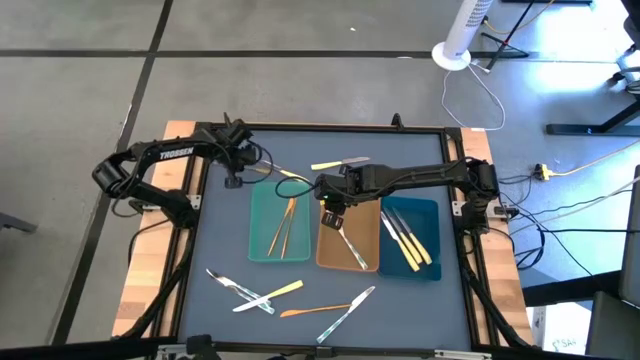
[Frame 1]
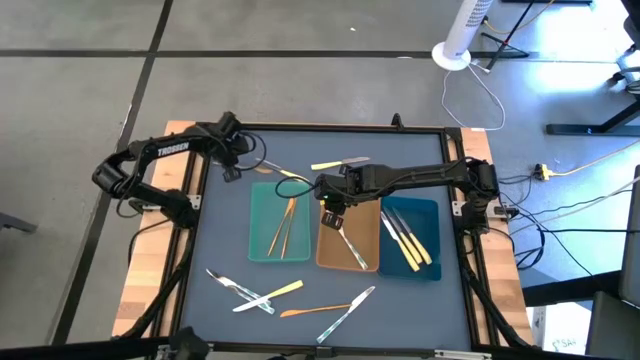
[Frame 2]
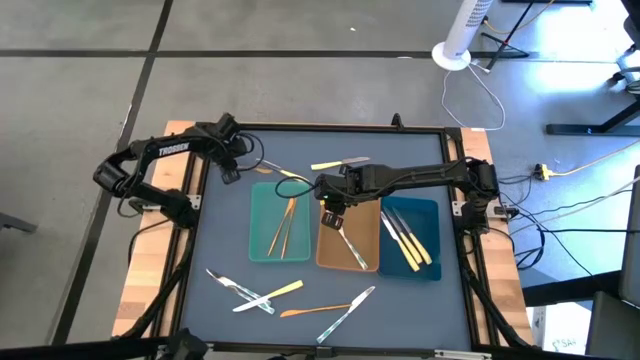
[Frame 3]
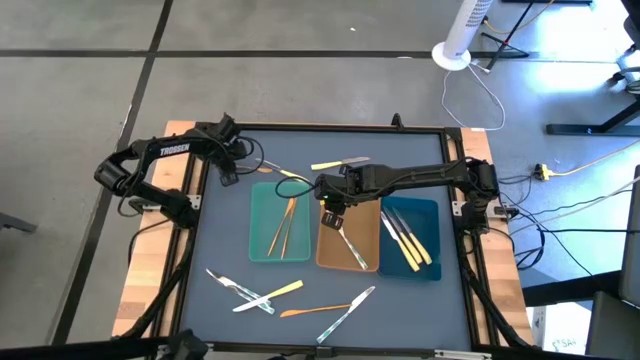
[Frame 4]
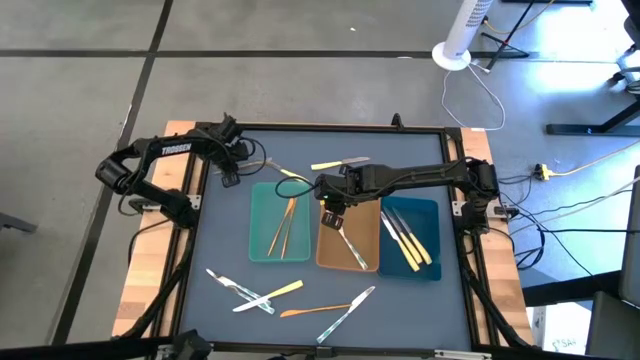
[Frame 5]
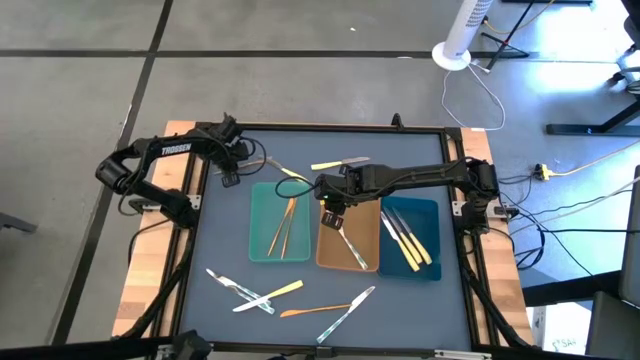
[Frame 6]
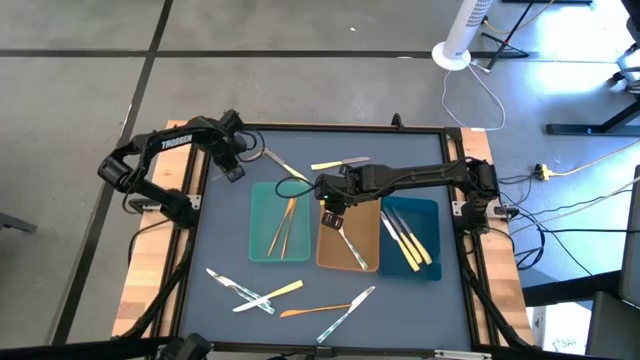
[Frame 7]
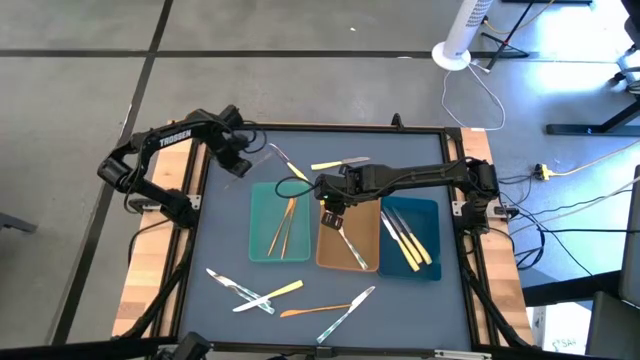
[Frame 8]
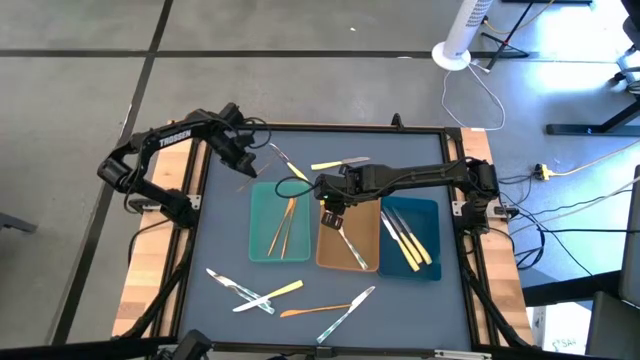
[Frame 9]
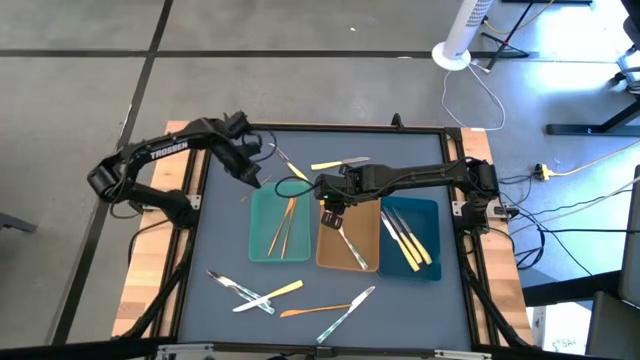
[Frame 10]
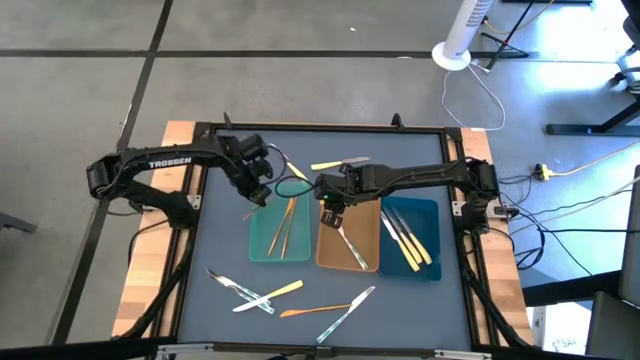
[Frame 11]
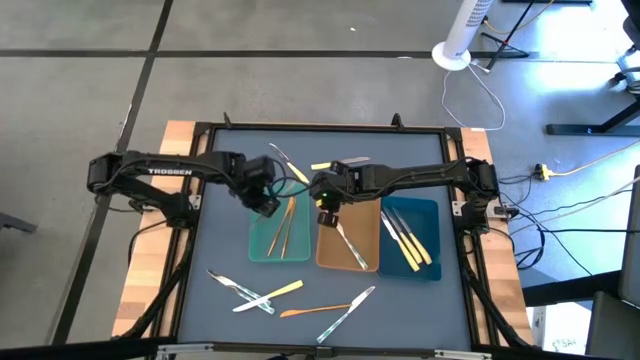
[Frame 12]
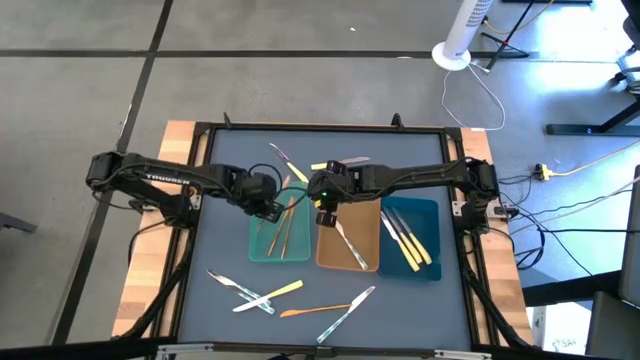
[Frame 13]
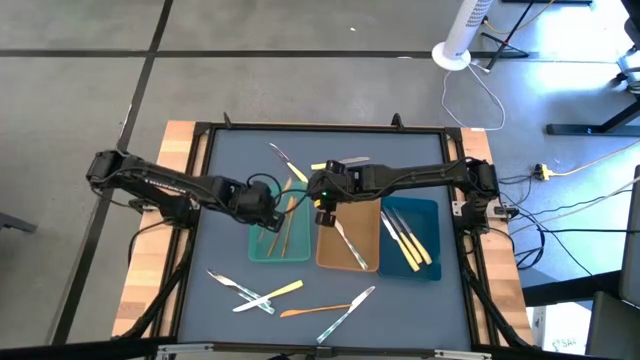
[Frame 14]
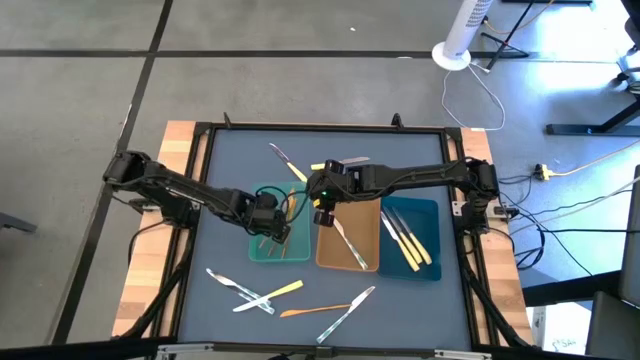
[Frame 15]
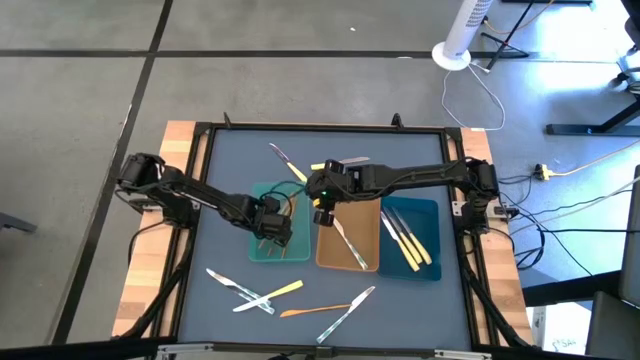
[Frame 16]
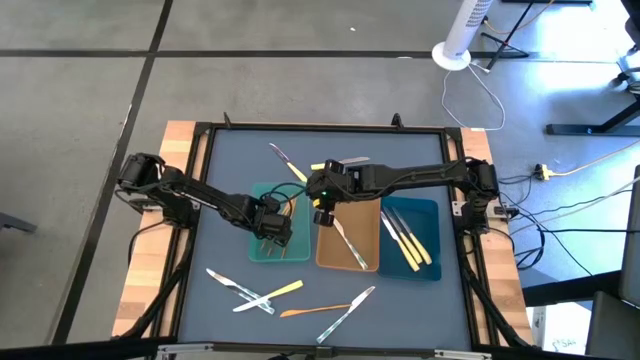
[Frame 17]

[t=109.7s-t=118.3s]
Task: Sort silverware by color (type)
Put the gold knife into the green bin

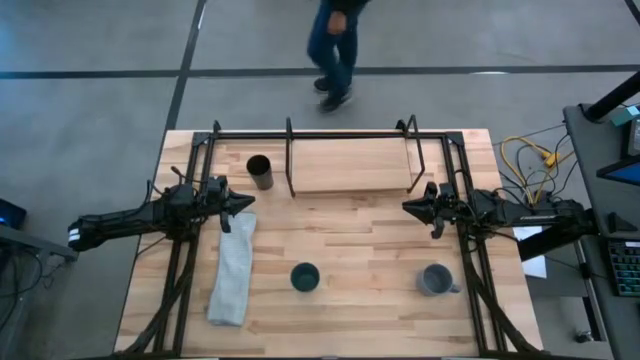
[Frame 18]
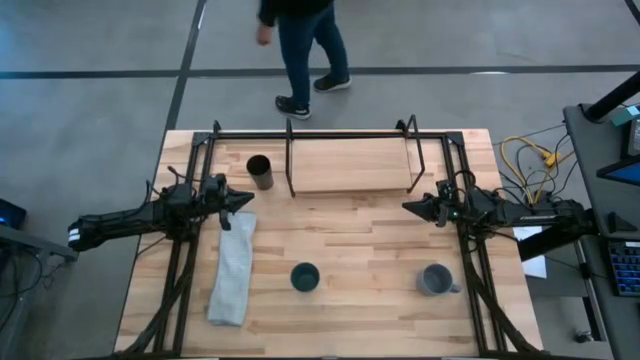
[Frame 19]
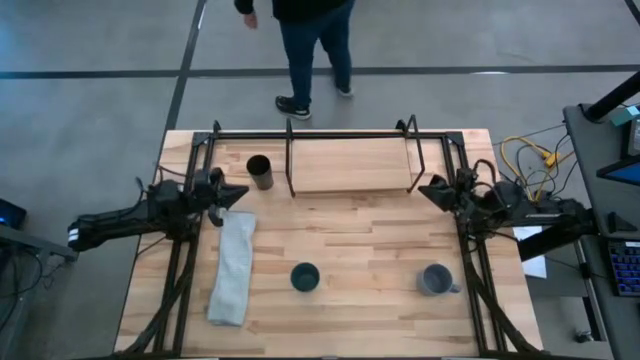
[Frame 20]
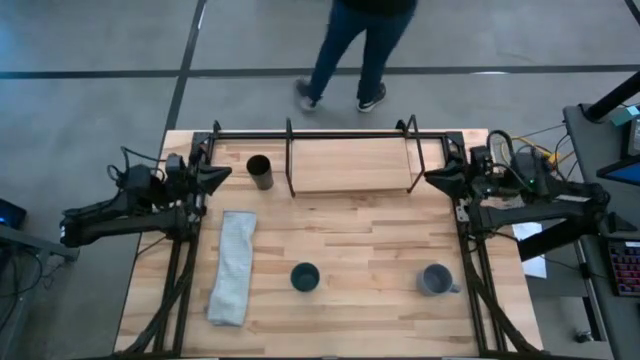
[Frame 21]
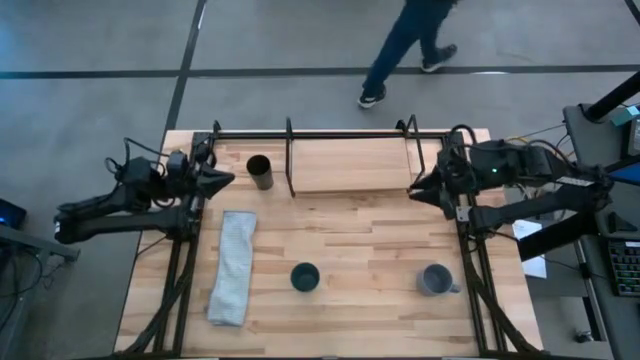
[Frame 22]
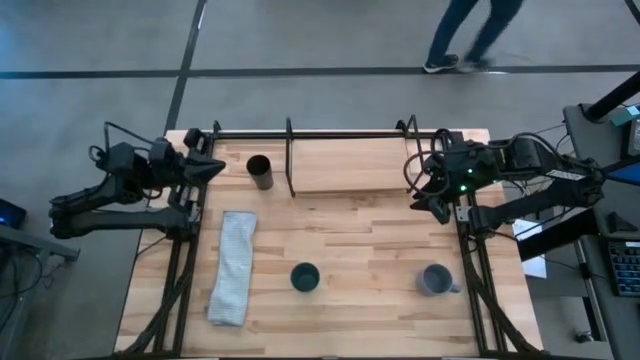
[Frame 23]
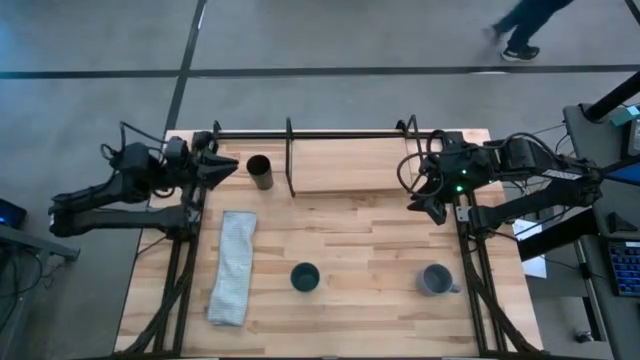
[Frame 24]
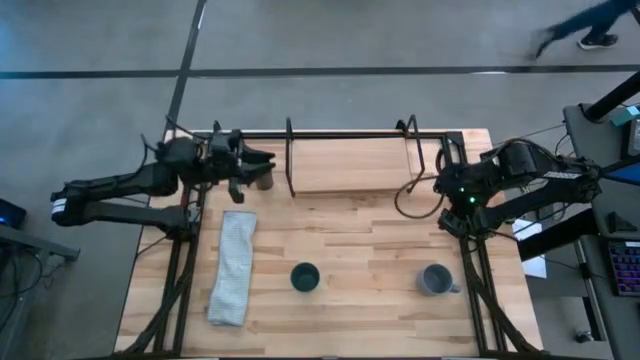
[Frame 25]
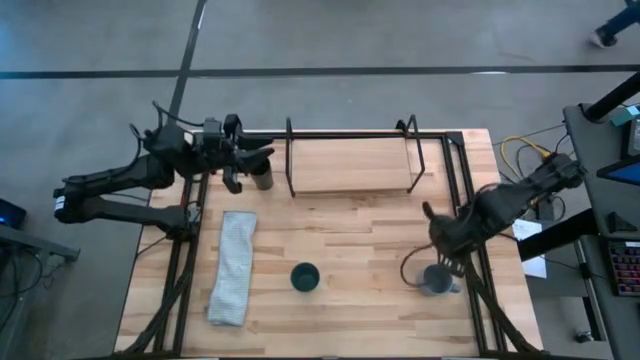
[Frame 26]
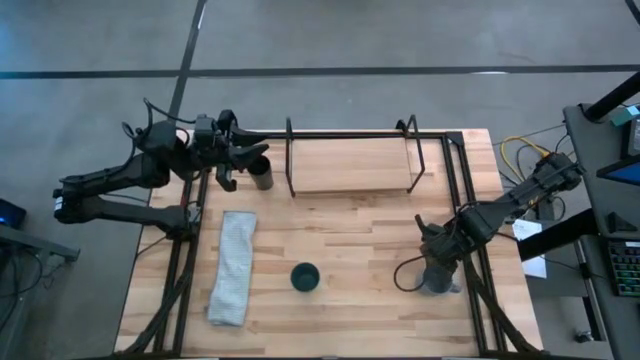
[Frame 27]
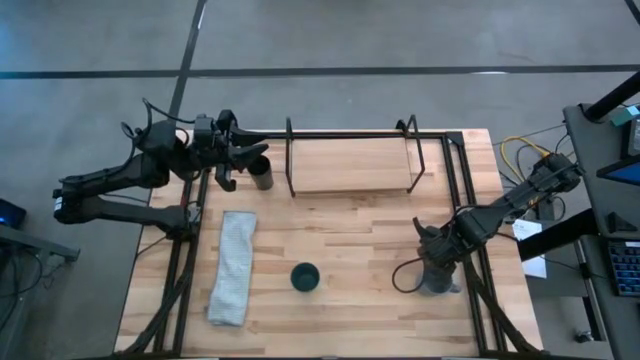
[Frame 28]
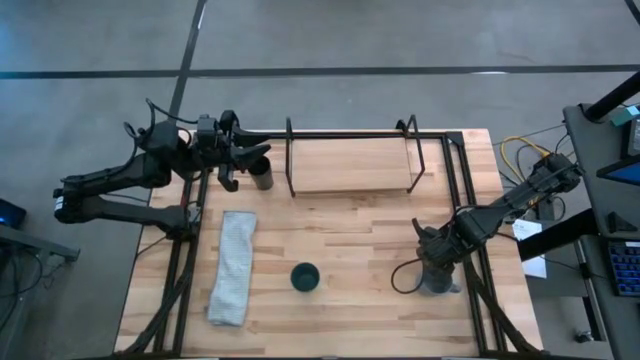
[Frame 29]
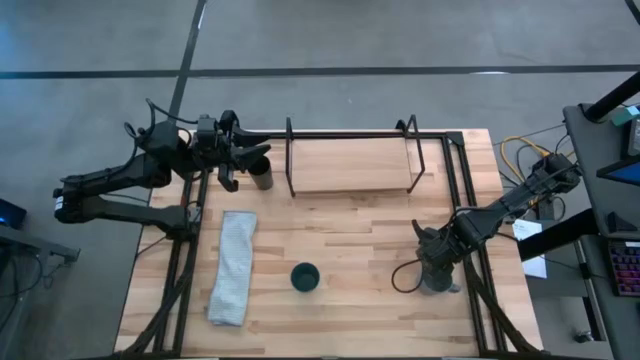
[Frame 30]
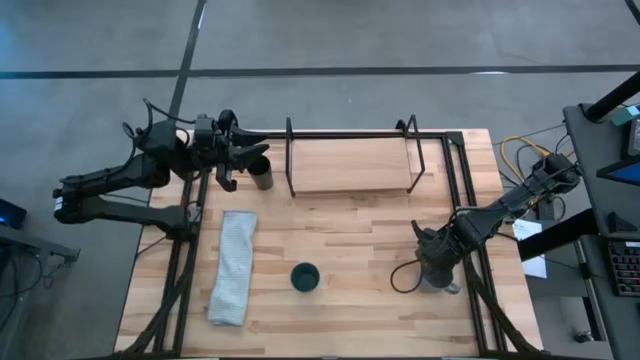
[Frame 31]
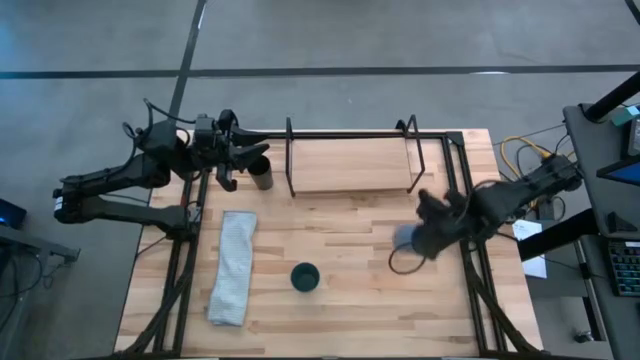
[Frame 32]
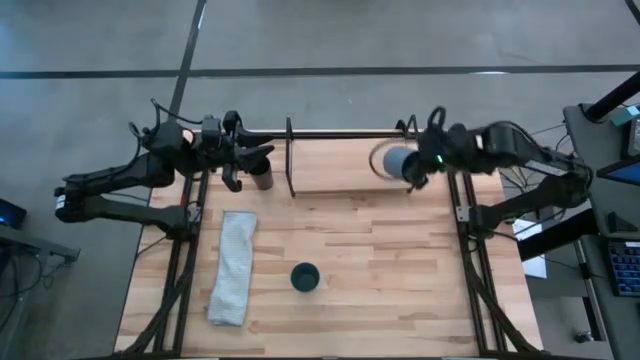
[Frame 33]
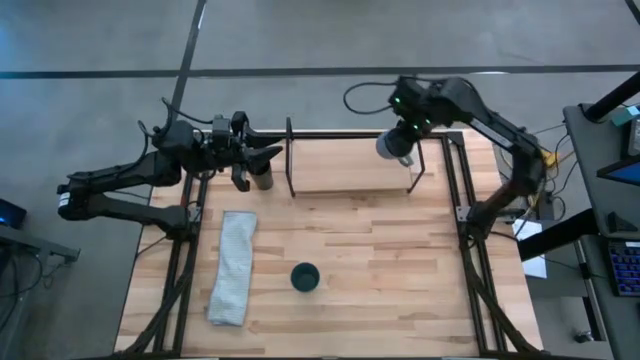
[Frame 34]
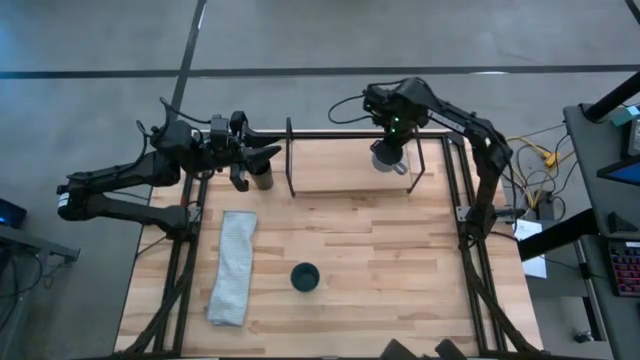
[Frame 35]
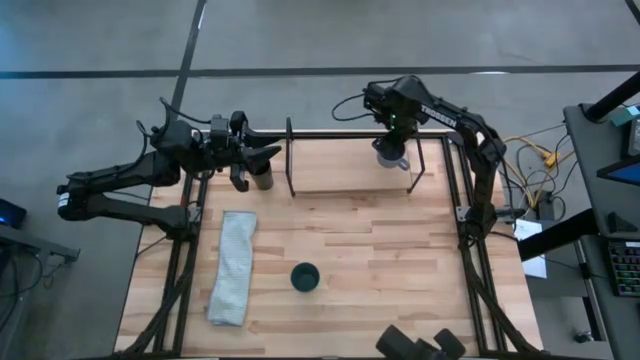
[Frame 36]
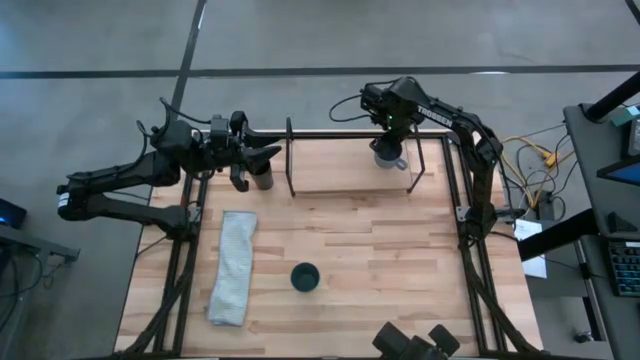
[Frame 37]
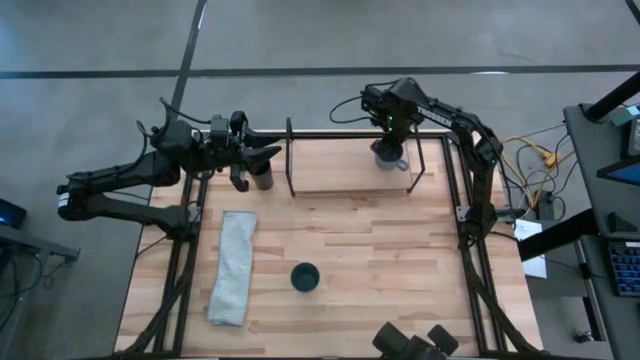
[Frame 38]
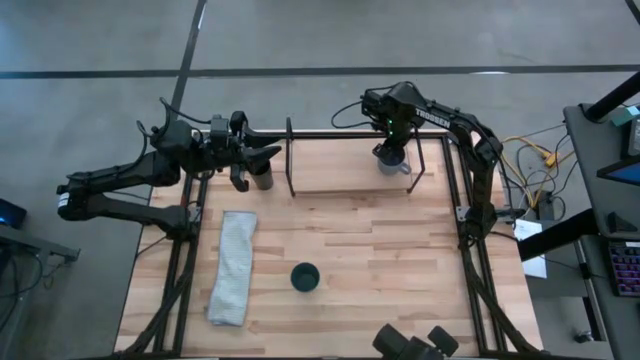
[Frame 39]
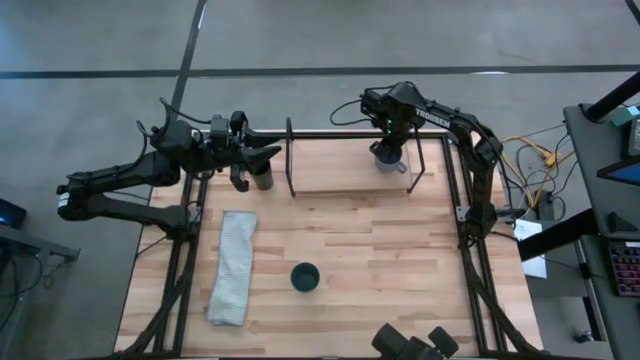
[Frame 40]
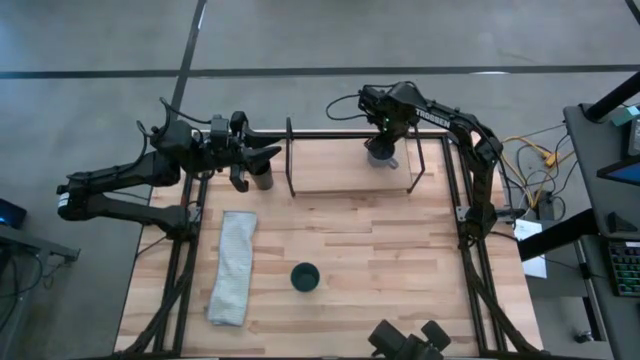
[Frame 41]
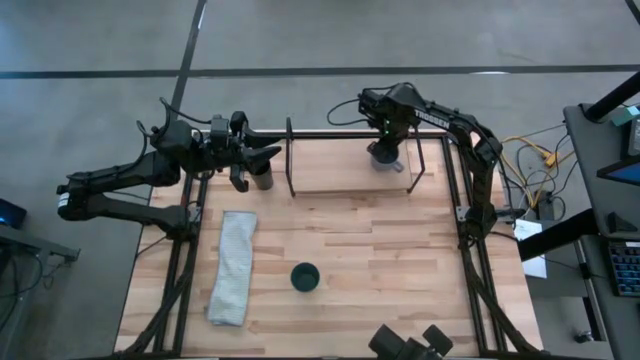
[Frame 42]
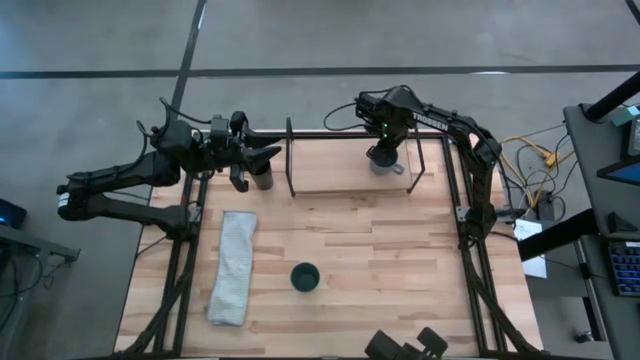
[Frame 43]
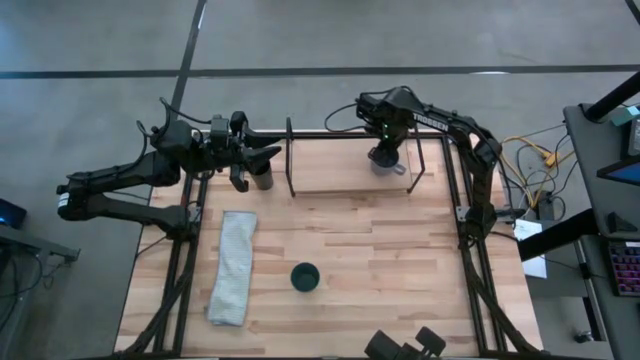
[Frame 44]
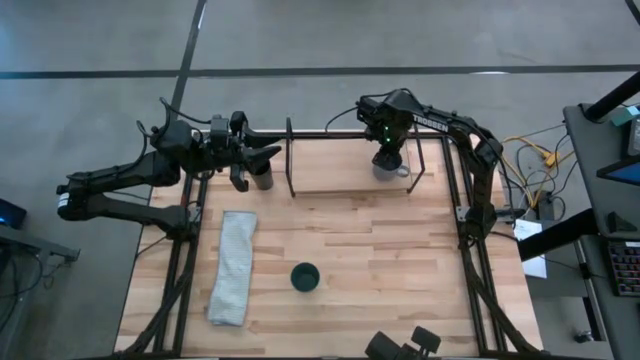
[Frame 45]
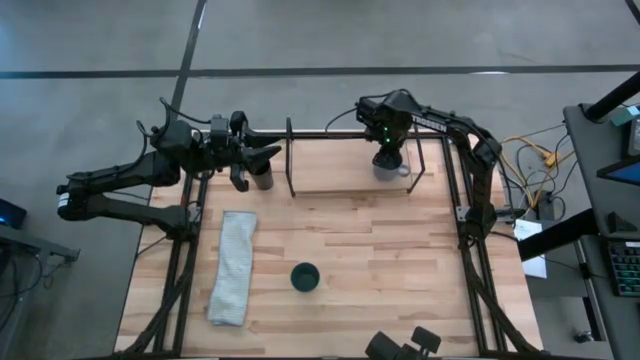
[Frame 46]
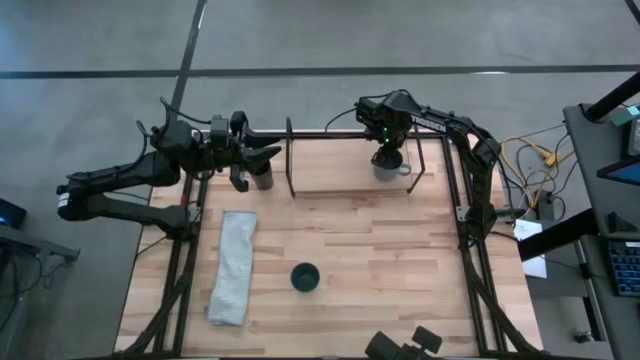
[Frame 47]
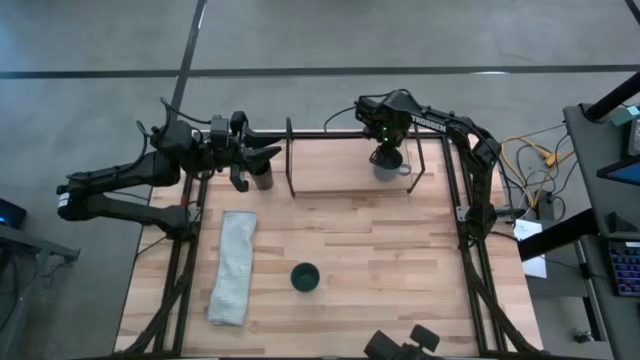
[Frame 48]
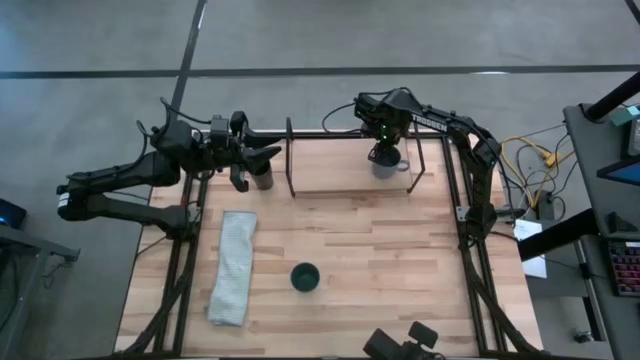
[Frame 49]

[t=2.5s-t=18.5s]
Task: Stack small to large cups/mugs on shelf
Put the blue mug on the shelf
